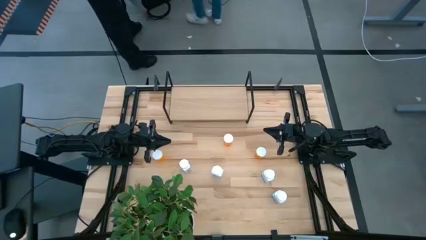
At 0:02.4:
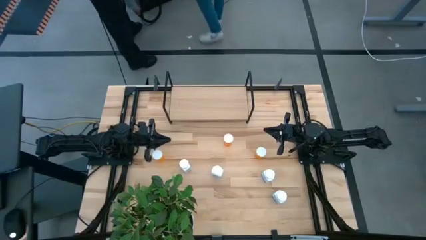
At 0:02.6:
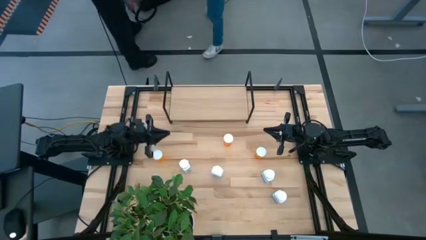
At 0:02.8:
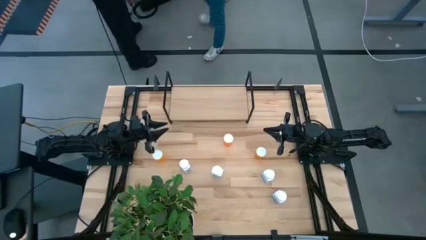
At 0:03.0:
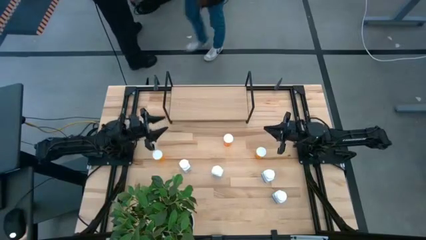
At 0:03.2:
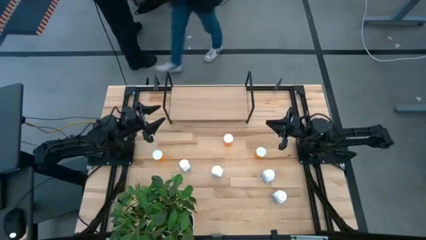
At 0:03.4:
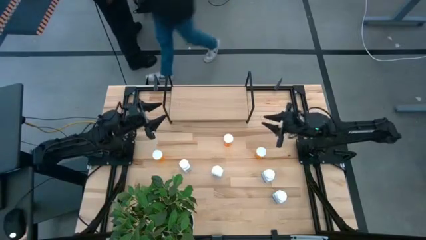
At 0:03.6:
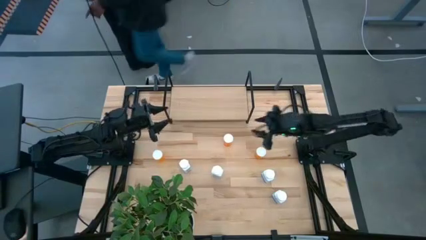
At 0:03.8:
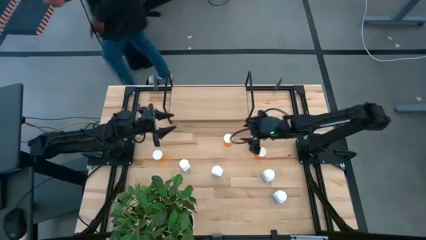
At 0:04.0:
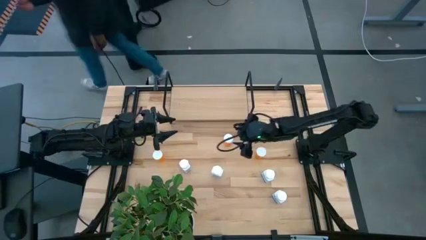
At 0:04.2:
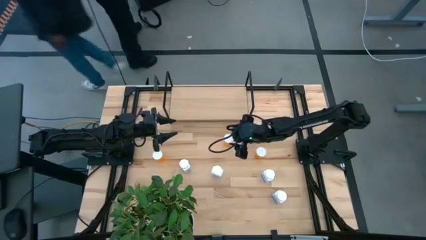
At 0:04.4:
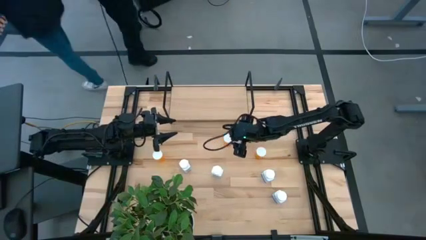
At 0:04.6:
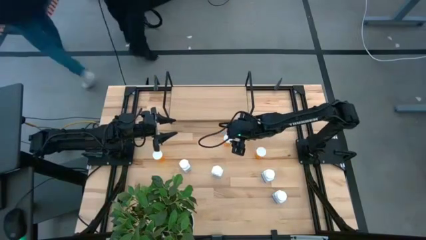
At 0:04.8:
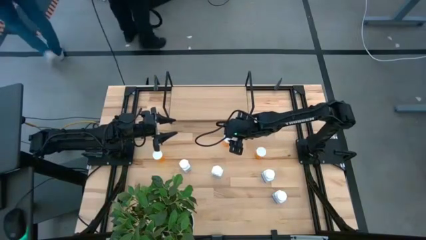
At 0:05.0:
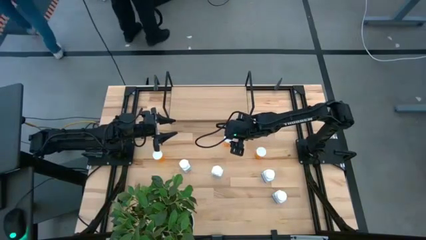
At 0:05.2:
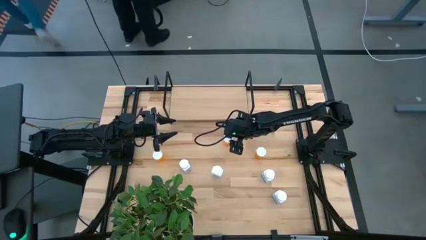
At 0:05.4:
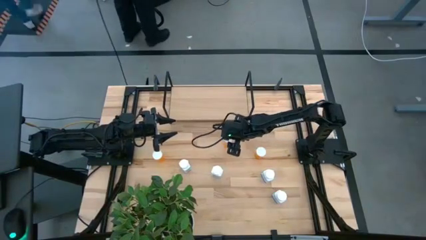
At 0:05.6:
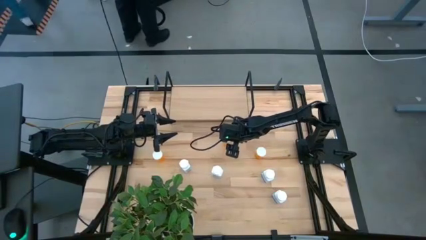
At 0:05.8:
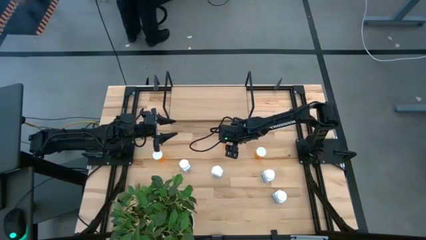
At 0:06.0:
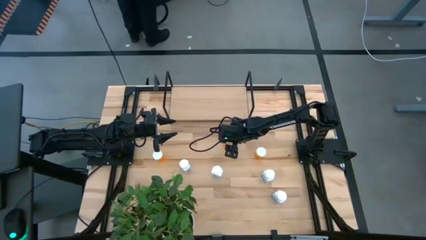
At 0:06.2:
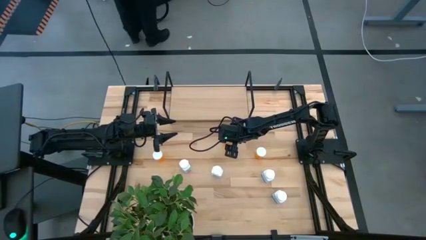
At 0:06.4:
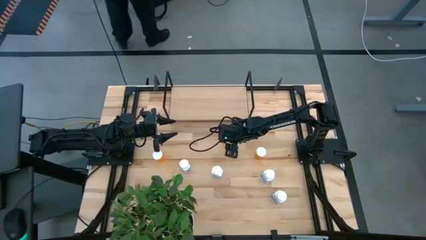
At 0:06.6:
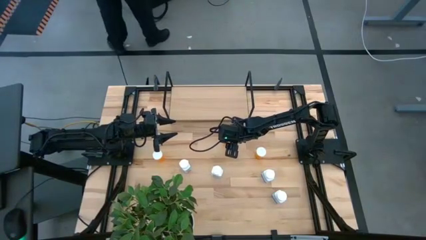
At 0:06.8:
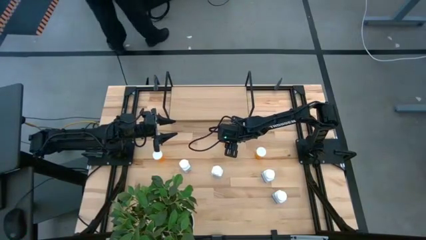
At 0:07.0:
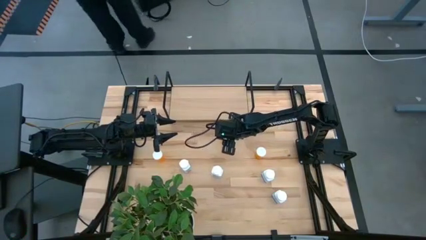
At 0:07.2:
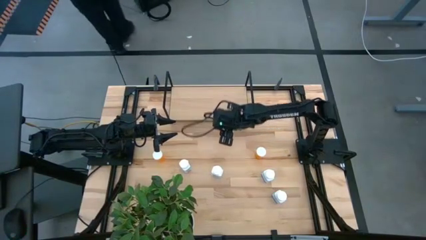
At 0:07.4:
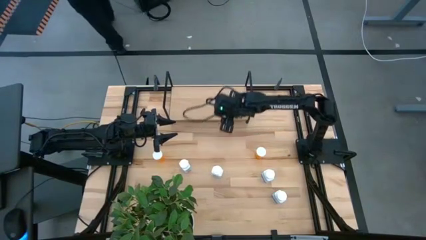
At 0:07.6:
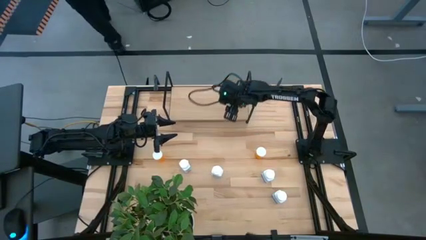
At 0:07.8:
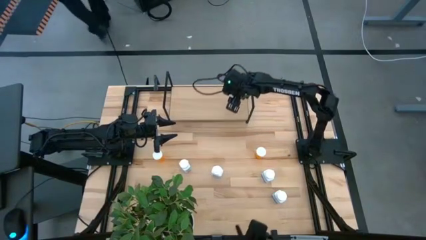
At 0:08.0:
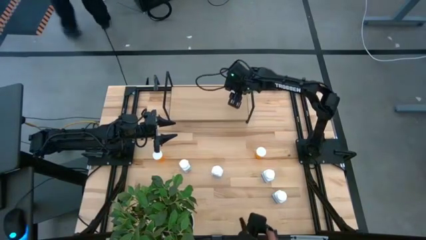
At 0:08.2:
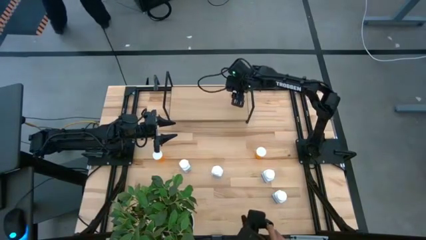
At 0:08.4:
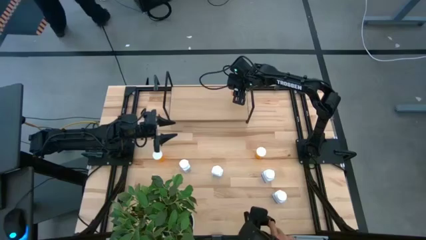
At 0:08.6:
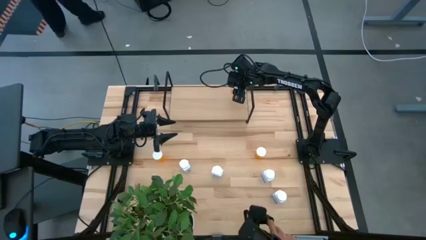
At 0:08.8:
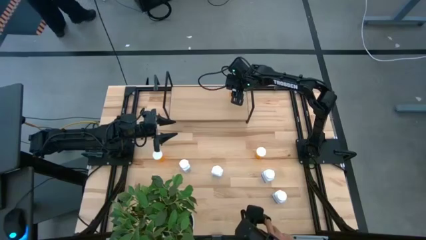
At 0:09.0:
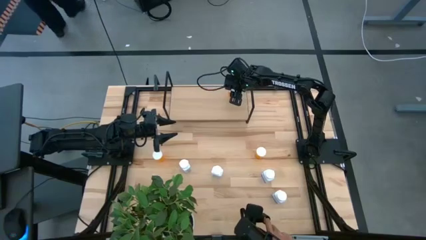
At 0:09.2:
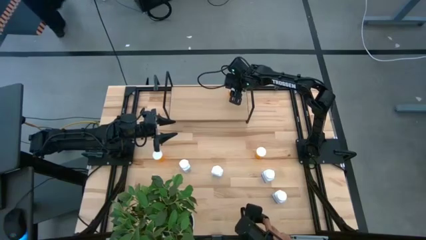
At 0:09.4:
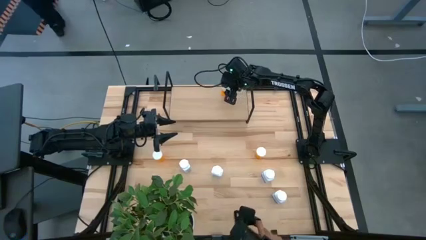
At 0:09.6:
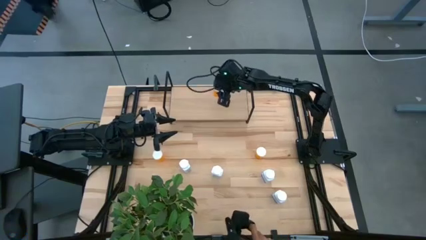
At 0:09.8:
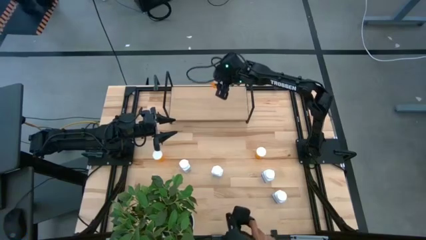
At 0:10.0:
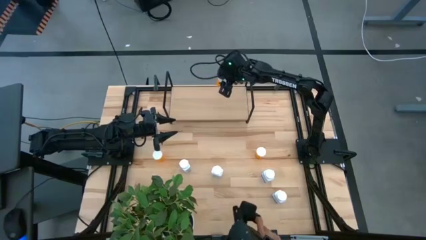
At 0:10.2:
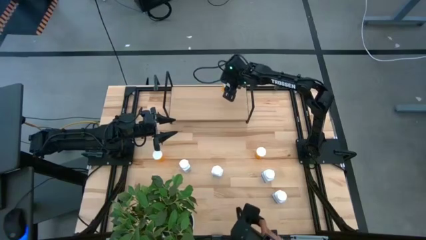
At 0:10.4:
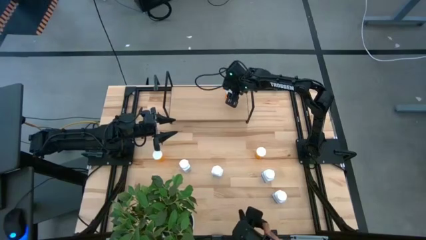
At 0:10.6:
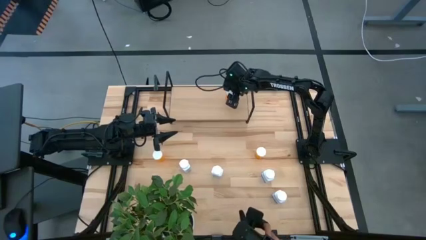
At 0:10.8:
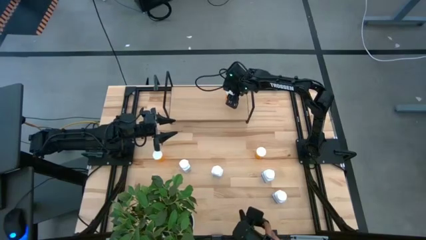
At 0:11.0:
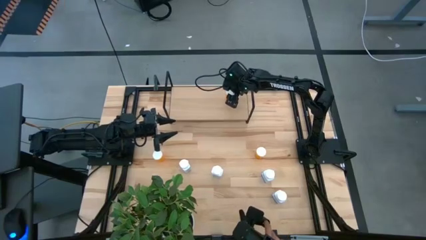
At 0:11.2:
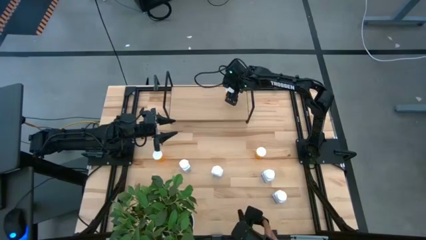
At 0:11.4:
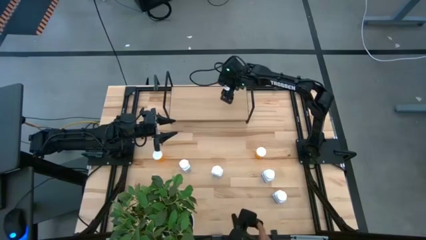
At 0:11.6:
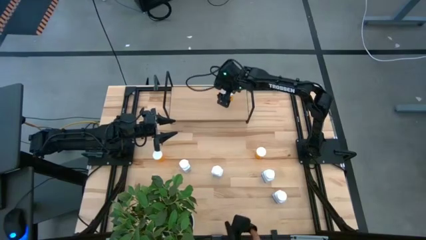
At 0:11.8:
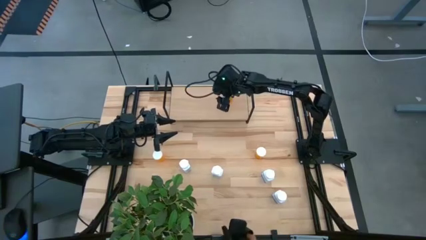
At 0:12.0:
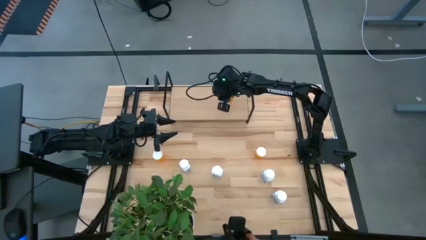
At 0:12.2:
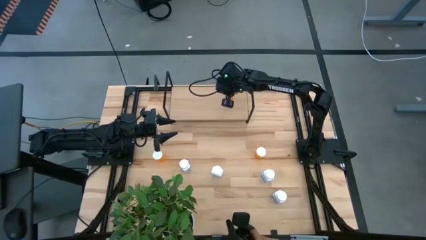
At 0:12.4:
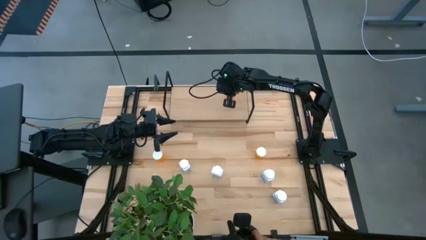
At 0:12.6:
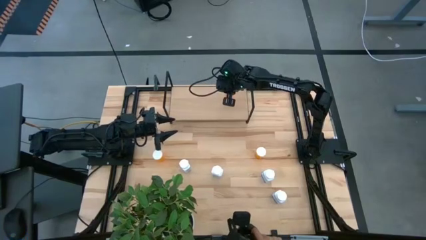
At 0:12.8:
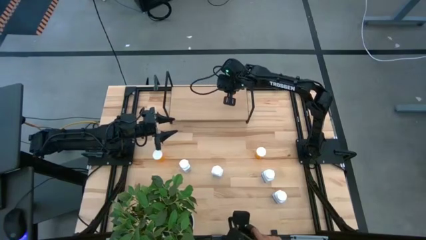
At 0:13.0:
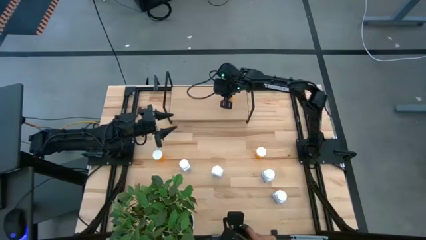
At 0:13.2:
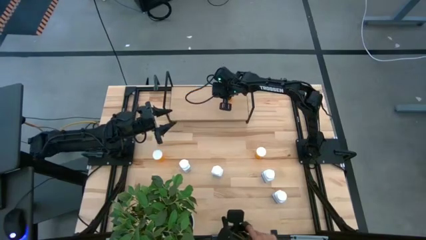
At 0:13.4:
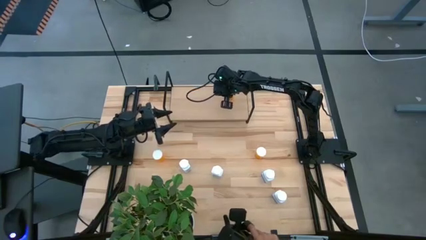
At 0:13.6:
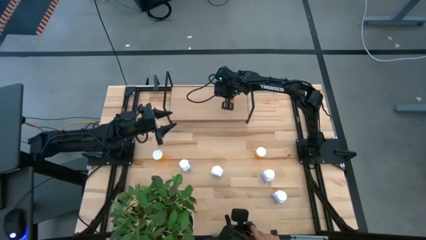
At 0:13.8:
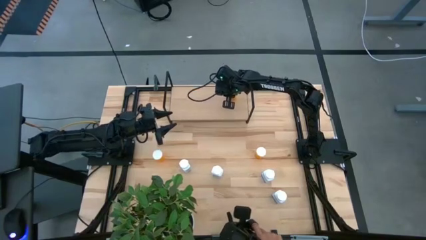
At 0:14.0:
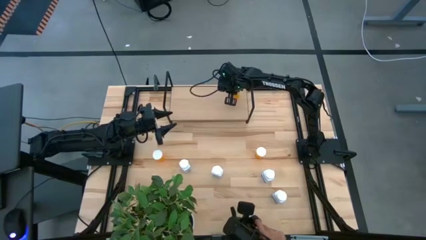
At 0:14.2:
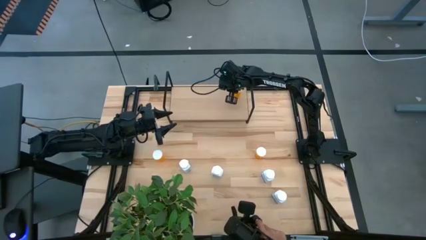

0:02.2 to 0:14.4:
Task: Pick and place medicine bottles onto shelf by color
Put the orange pill bottle on the shelf

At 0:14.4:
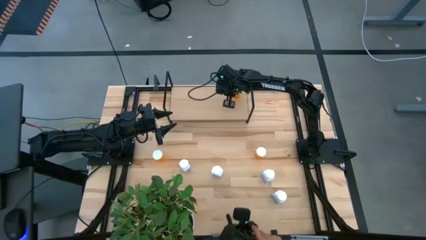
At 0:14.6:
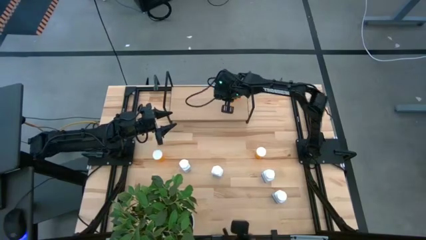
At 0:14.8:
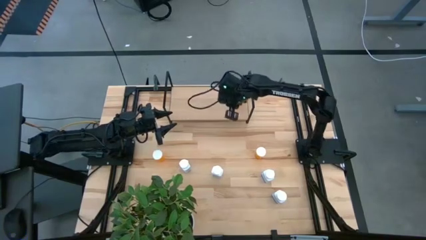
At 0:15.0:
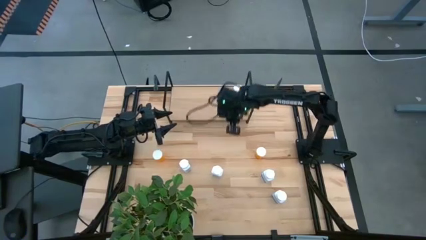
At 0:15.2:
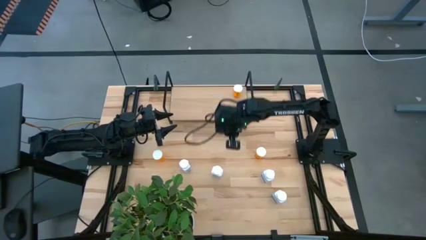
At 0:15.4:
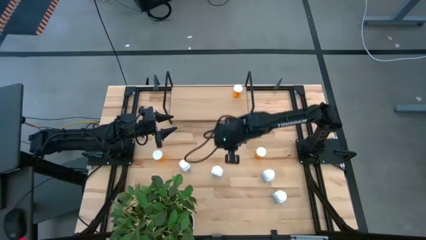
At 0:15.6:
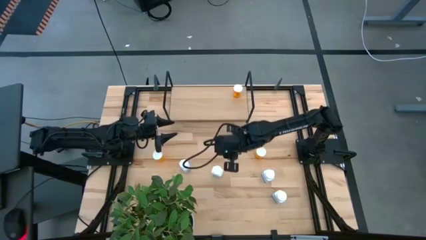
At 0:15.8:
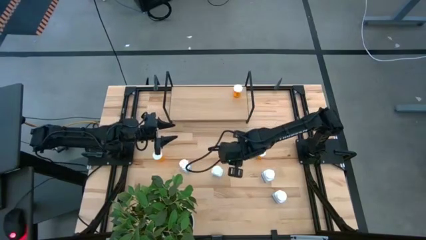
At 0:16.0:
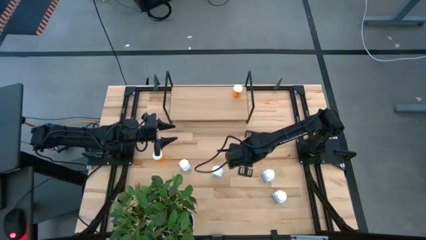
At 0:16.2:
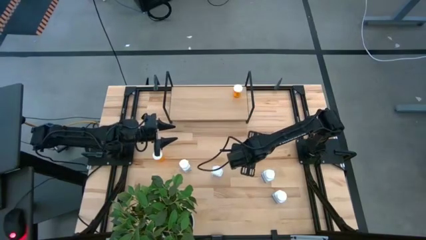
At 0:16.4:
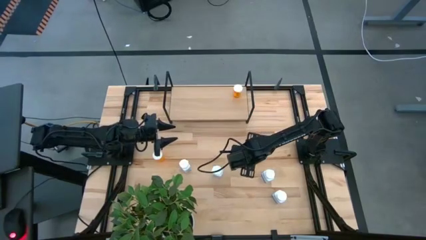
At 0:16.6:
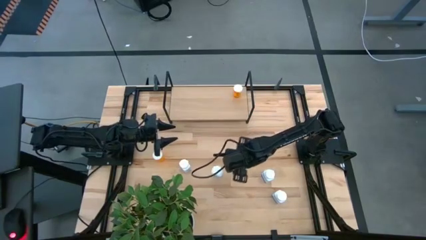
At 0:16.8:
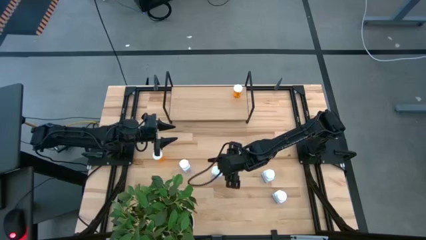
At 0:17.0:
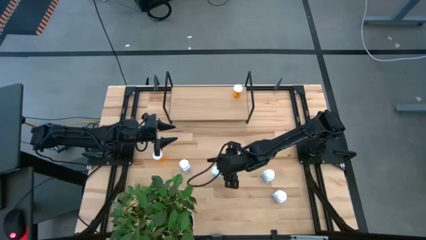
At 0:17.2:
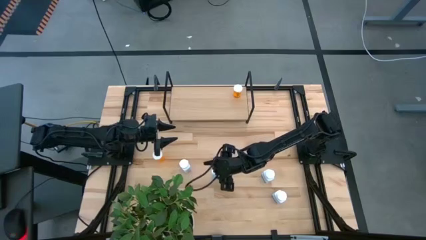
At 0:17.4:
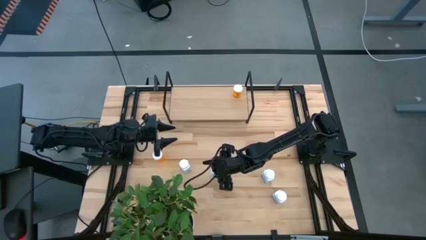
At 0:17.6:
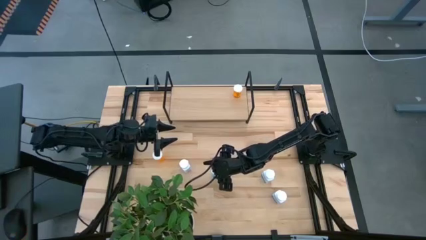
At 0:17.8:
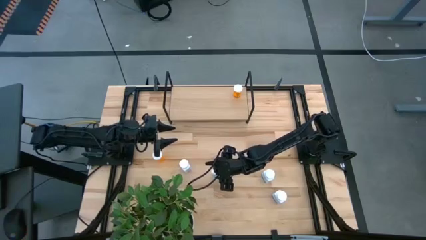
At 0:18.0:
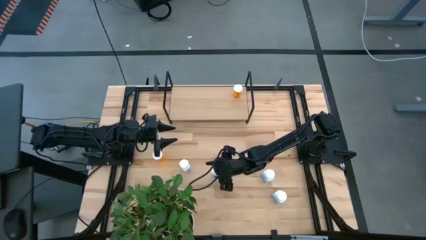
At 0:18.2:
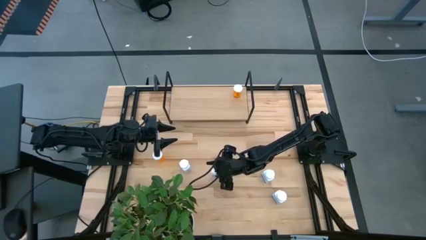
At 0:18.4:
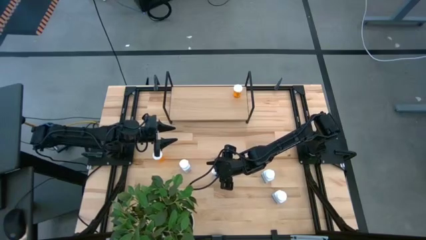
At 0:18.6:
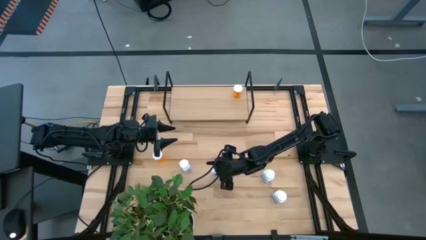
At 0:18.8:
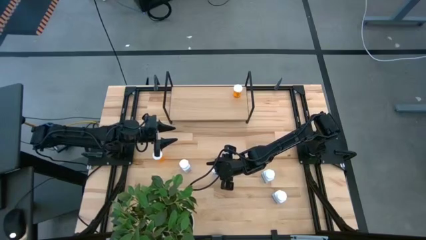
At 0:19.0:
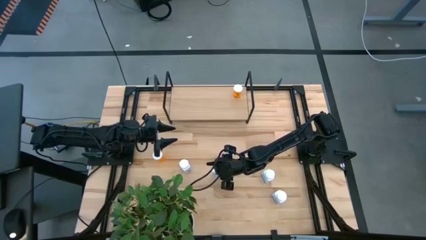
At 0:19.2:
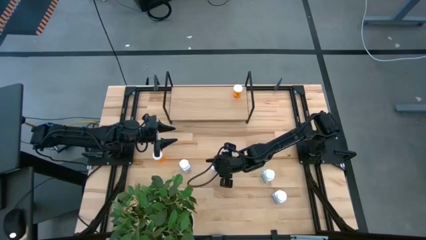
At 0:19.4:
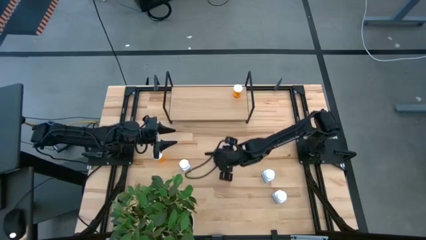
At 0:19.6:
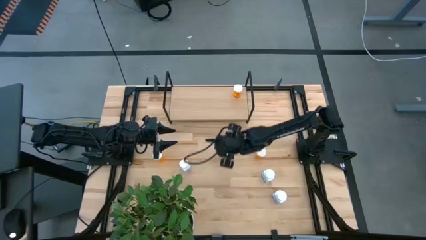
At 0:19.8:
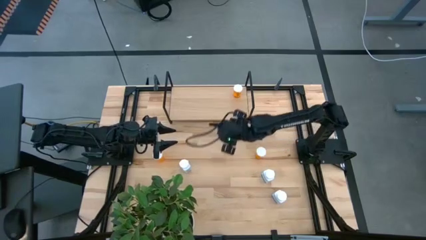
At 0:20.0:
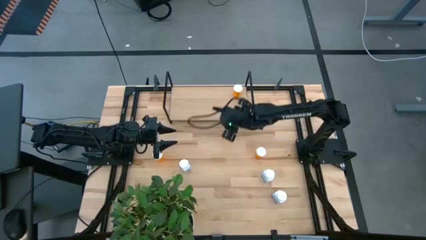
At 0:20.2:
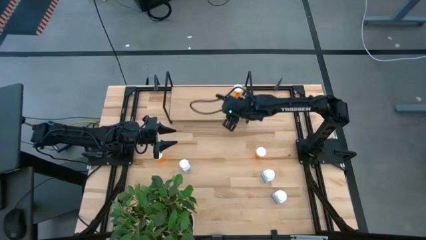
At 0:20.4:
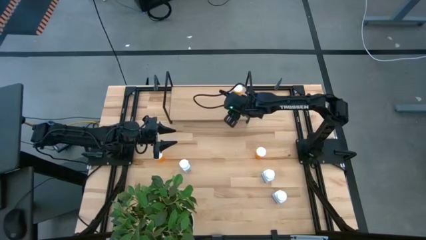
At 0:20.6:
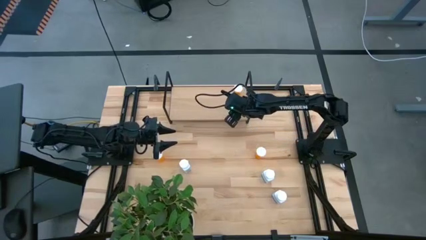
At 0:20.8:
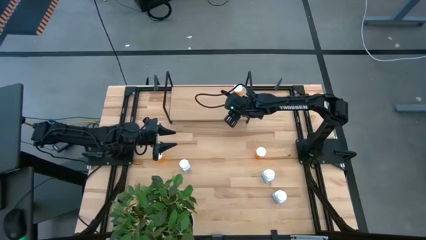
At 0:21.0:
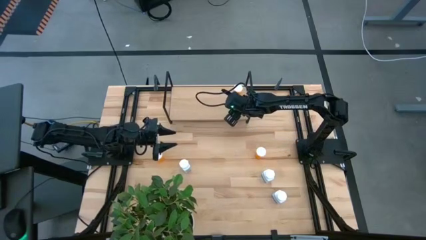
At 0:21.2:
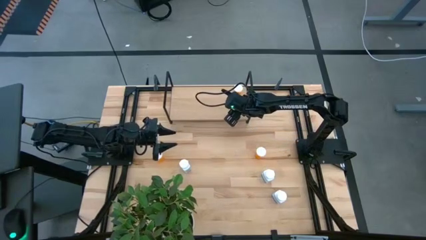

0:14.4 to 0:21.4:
Put the white pill bottle on the shelf
